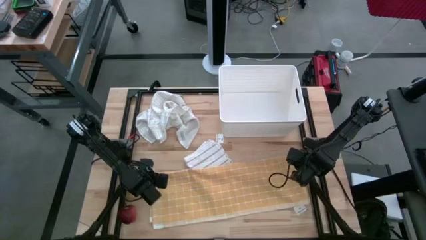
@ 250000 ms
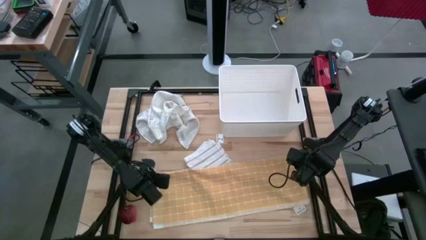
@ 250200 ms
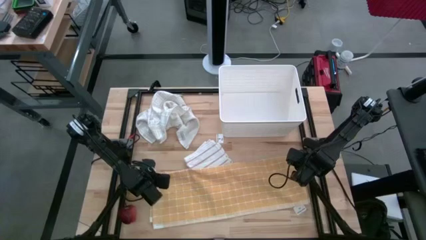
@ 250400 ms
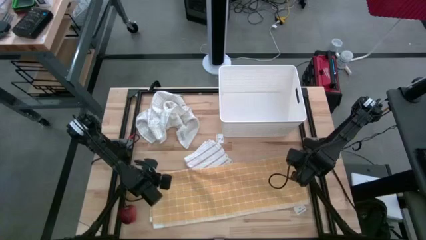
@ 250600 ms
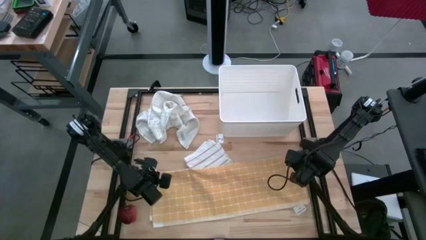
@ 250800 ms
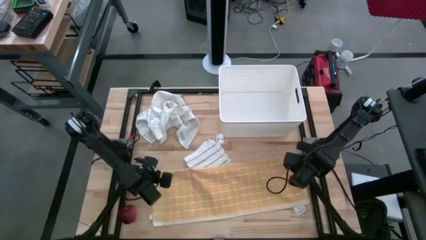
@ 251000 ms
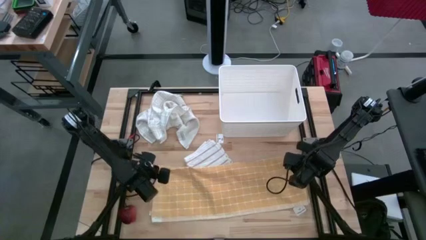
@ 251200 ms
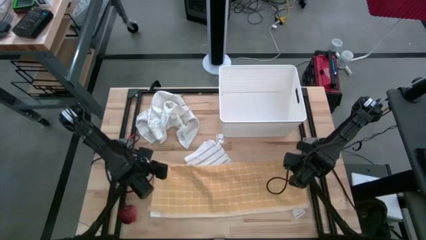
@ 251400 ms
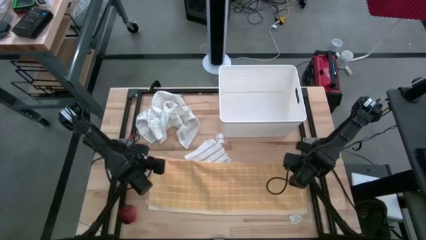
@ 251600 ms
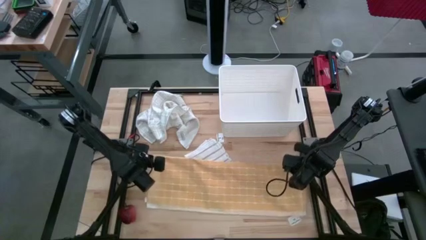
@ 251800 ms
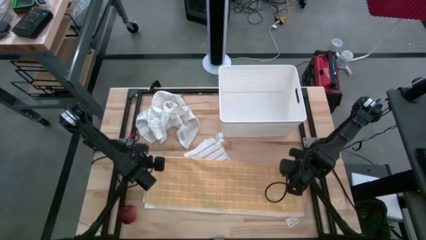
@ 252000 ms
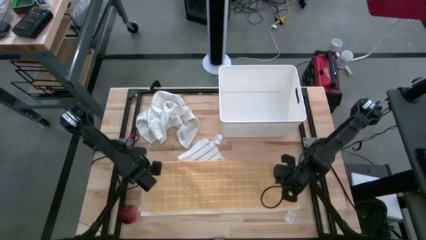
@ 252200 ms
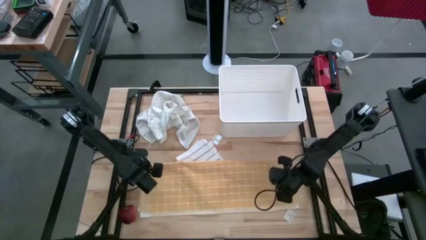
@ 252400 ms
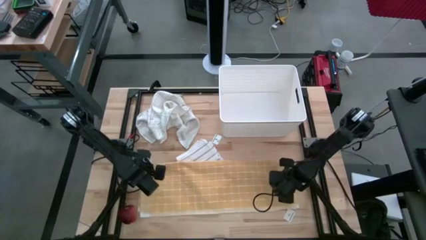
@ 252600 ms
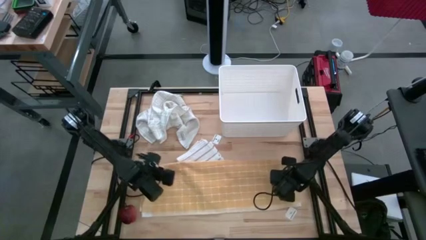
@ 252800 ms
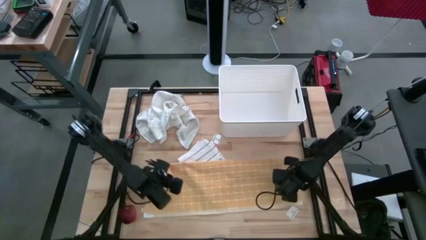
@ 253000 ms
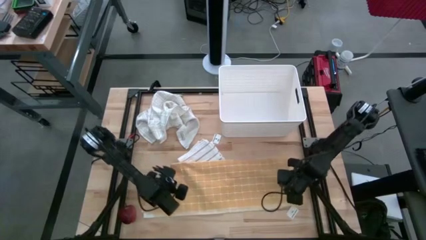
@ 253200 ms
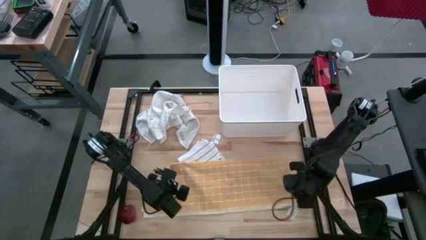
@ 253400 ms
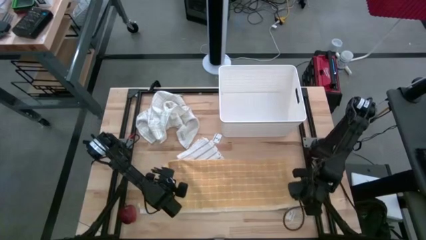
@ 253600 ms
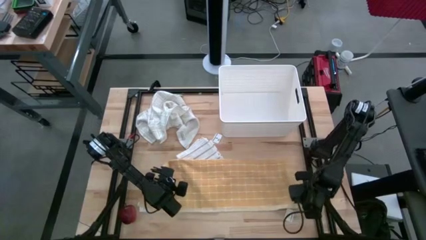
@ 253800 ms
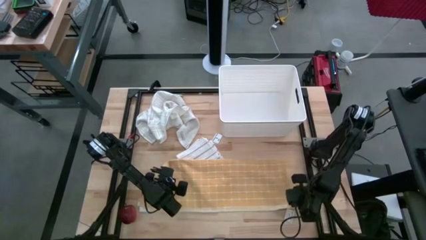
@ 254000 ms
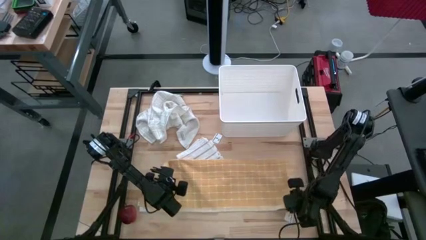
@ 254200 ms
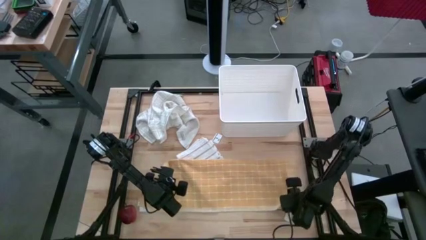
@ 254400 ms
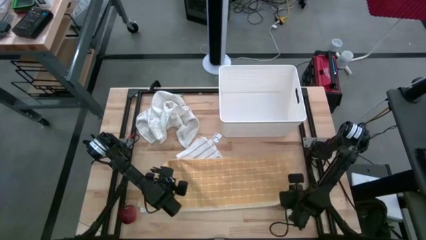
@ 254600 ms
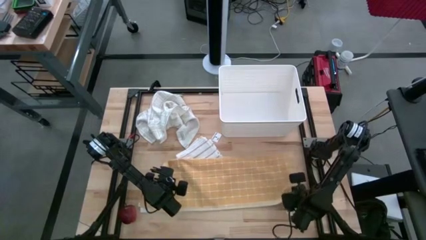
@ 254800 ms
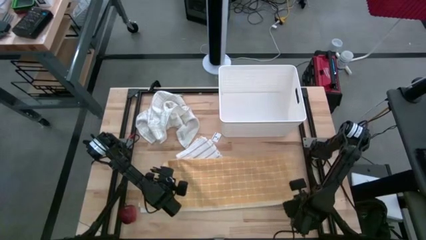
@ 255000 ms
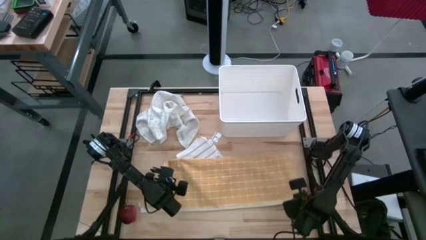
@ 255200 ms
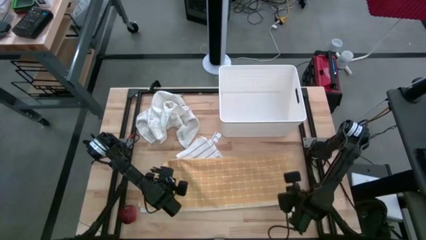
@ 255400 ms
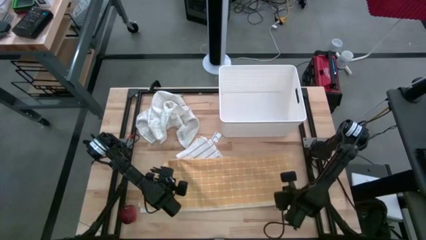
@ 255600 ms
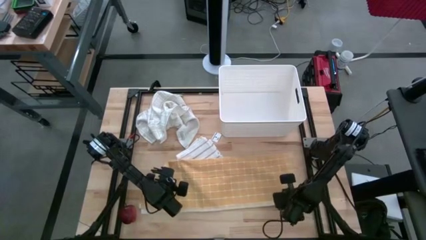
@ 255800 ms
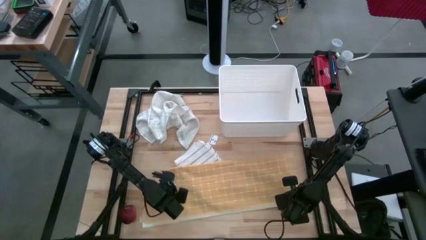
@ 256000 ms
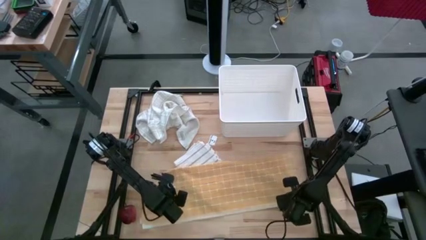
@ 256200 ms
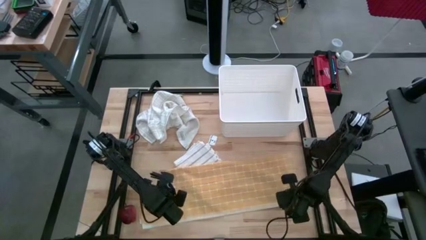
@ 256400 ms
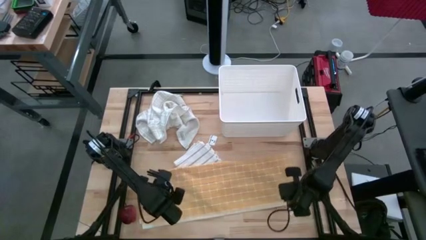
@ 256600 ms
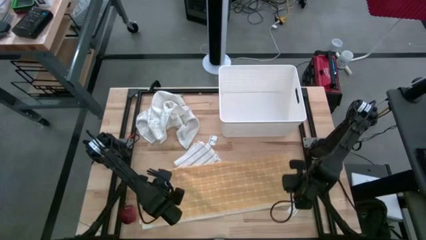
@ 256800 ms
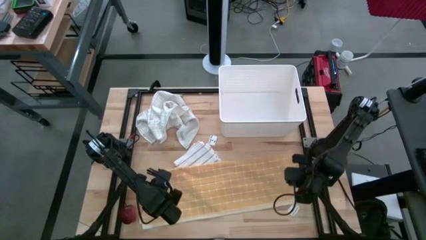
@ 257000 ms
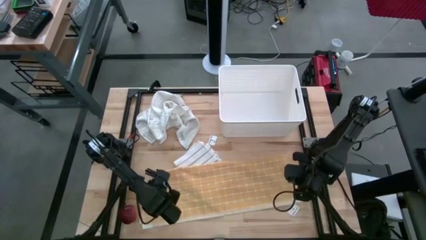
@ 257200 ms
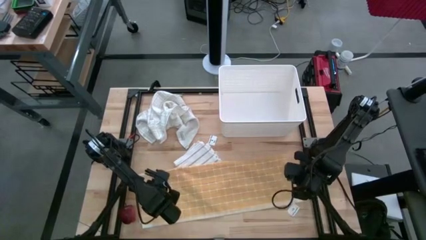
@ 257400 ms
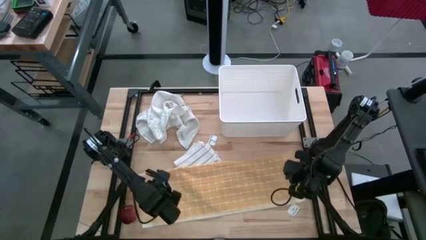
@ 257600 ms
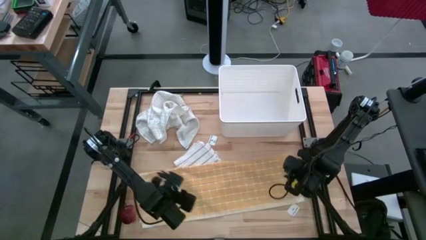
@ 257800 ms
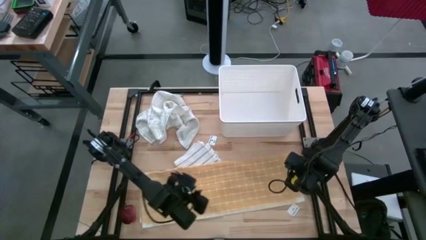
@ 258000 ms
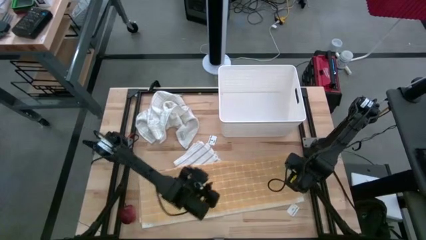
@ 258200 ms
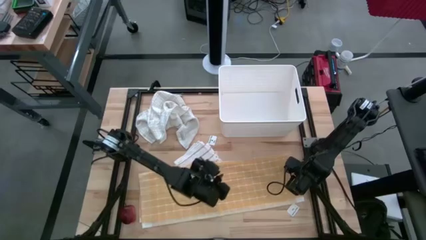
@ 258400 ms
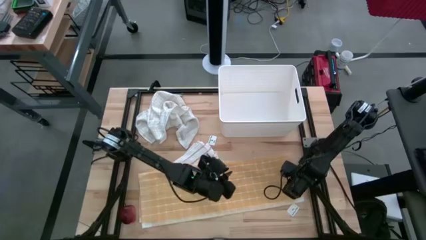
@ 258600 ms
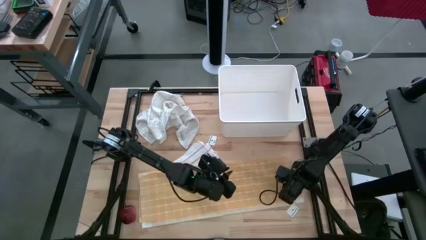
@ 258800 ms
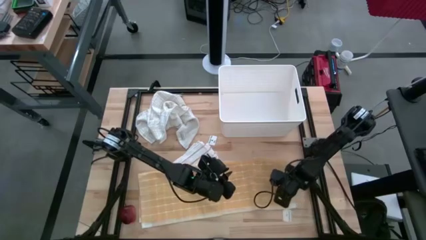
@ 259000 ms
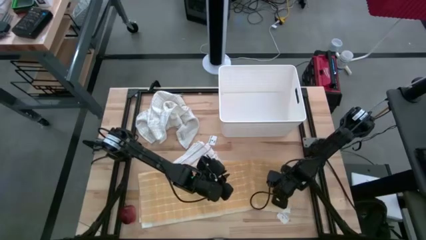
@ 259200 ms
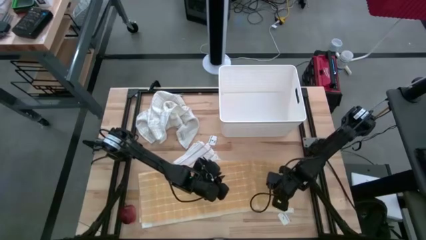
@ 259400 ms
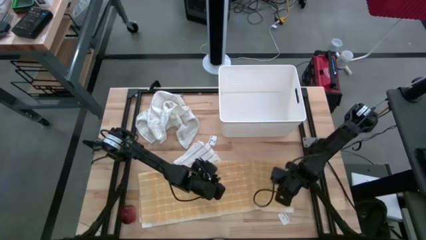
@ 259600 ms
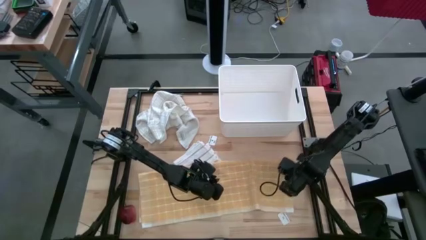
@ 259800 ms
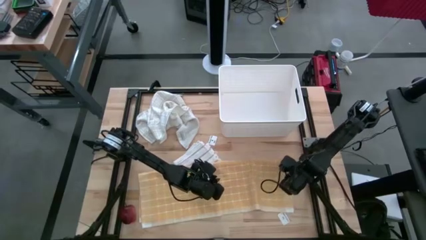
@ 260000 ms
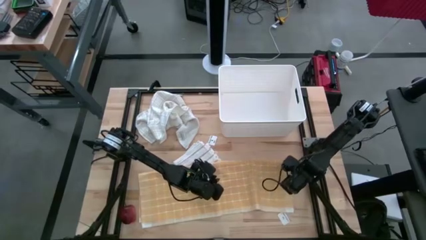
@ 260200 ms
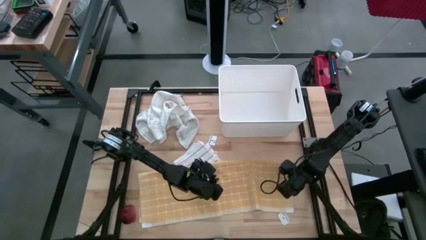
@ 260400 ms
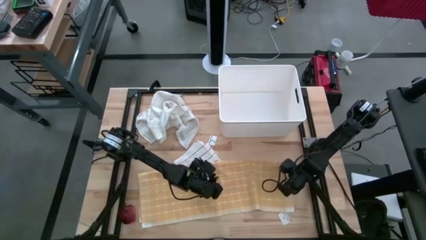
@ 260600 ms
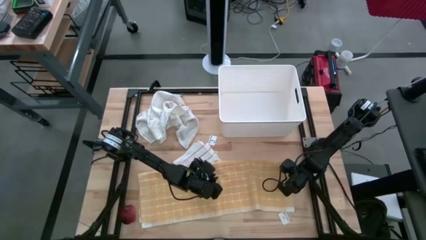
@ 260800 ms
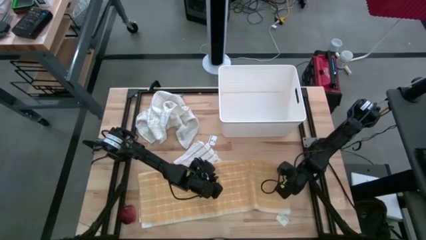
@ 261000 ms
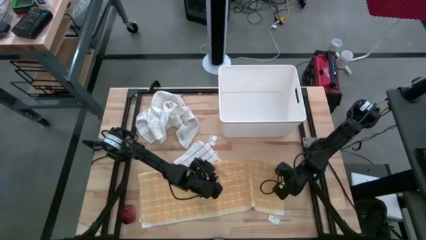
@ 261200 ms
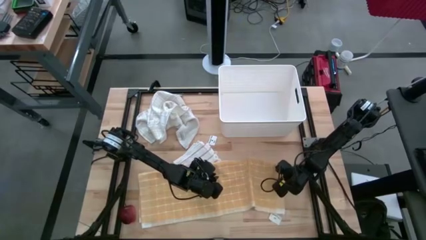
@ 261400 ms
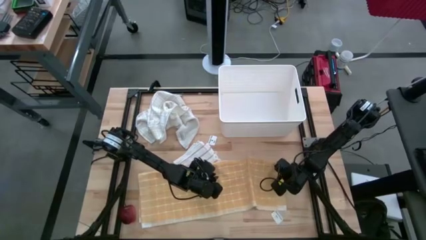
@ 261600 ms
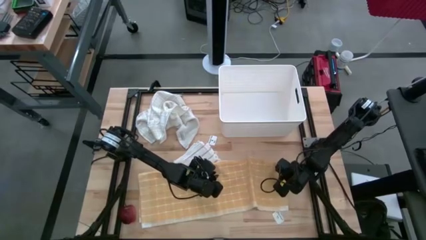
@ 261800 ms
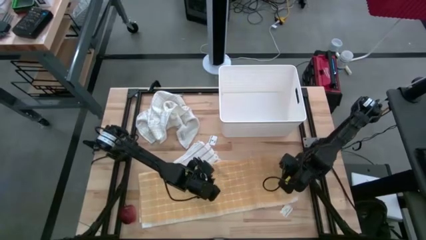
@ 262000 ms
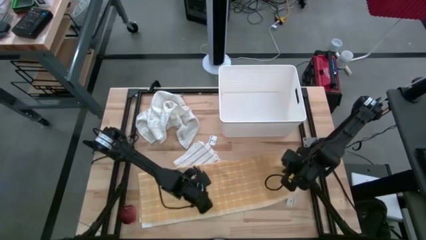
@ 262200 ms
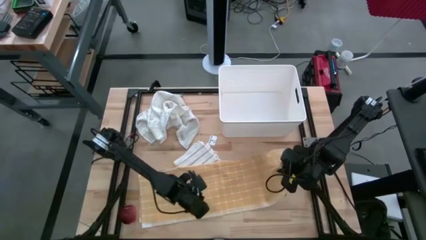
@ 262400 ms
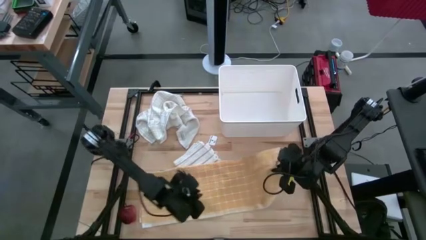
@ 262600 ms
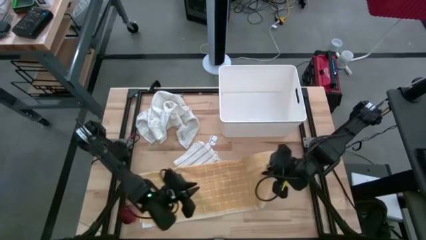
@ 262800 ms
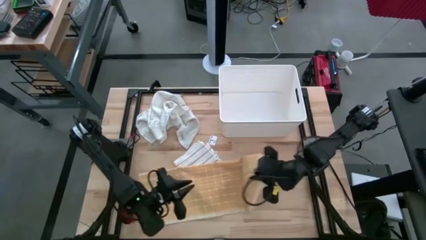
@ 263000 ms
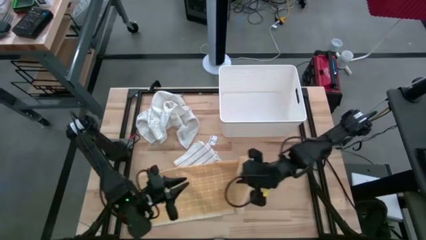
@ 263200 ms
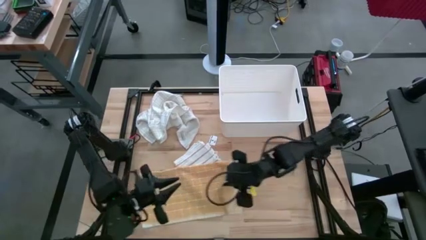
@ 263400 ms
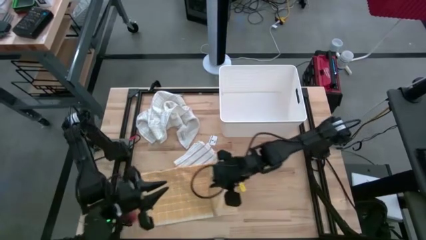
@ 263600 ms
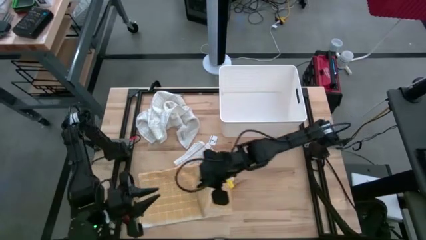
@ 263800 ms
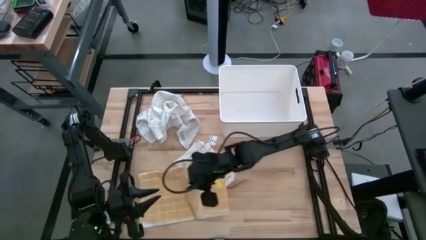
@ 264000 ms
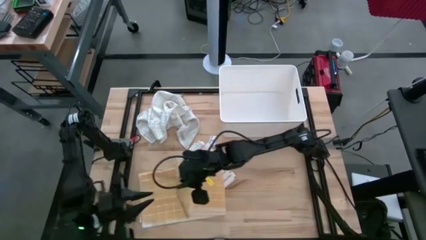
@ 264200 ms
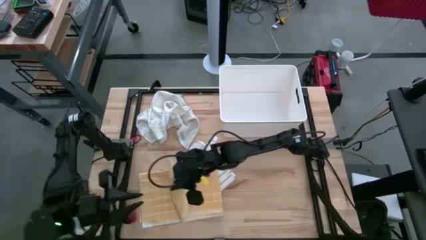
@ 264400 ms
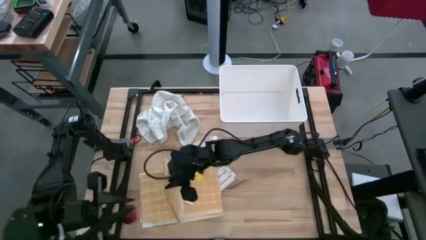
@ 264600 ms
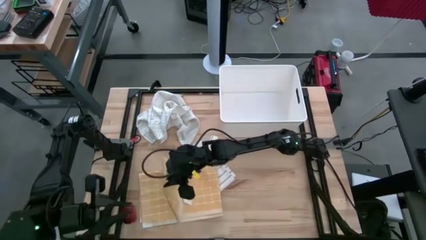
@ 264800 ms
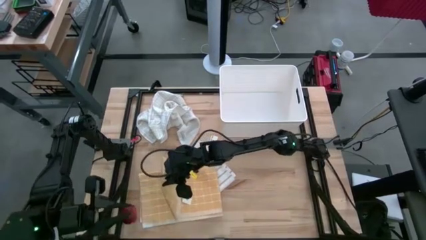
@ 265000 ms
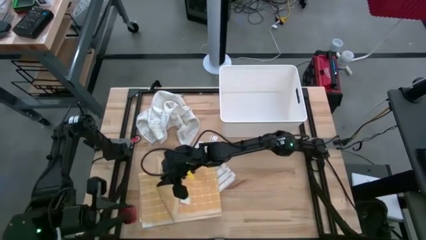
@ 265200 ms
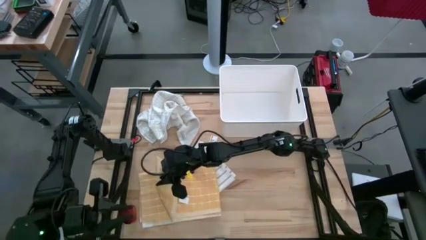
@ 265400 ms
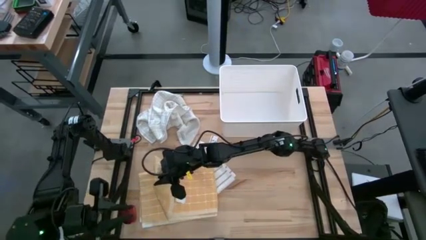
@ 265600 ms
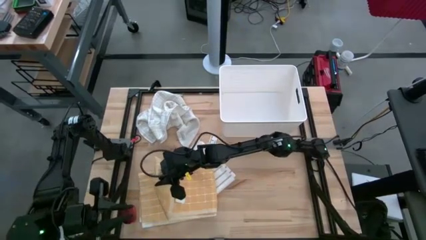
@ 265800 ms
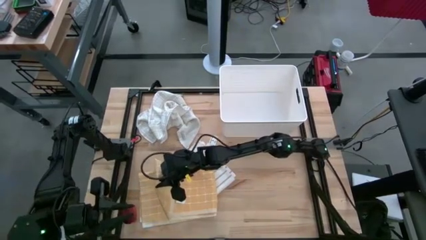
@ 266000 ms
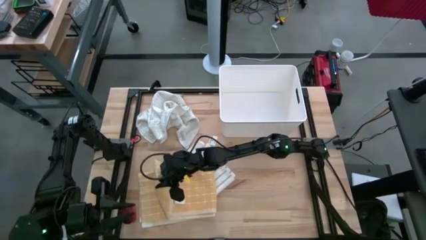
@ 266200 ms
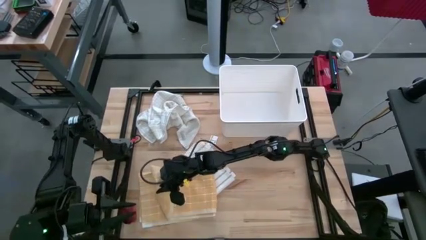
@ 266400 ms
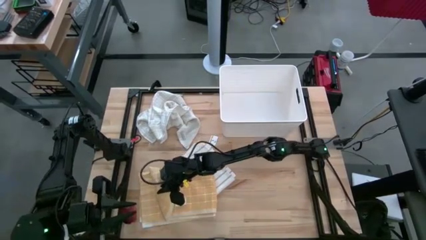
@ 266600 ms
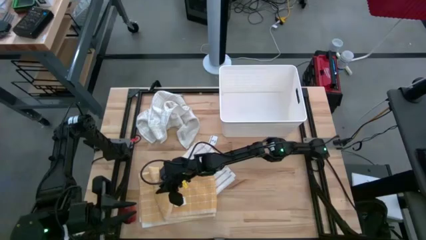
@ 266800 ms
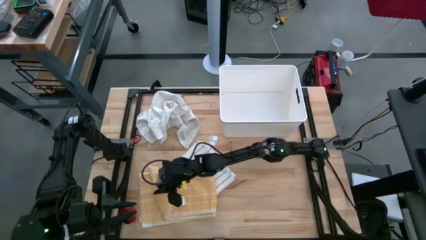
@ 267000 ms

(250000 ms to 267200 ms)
Task: Fold towel
Fold the yellow squared towel
